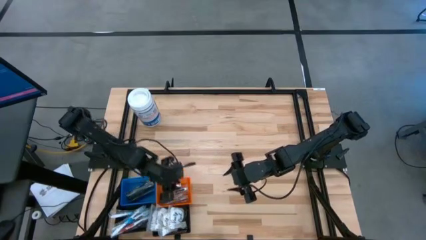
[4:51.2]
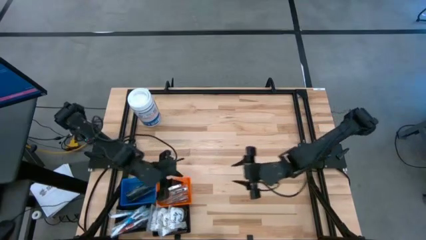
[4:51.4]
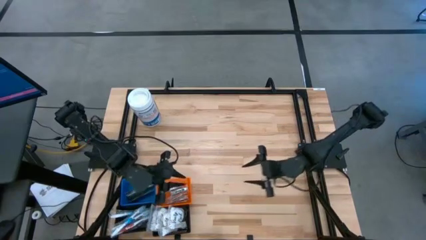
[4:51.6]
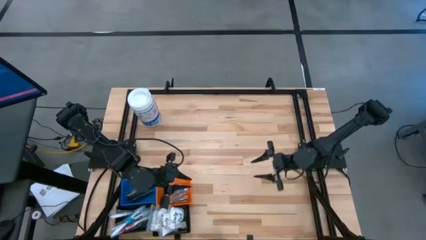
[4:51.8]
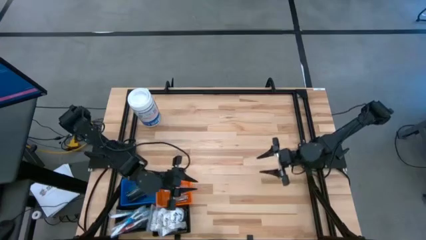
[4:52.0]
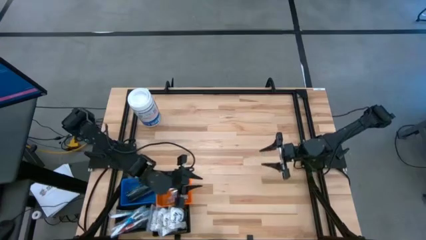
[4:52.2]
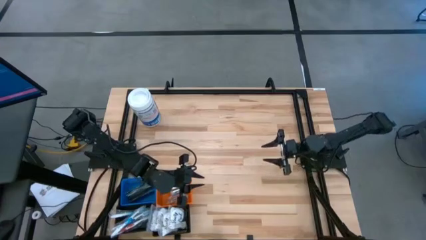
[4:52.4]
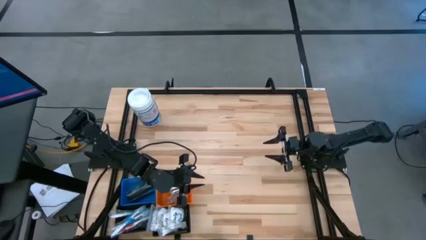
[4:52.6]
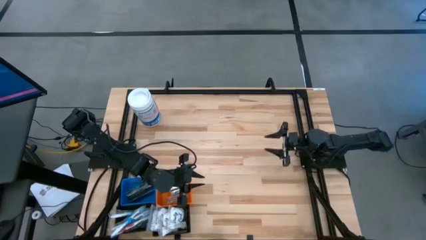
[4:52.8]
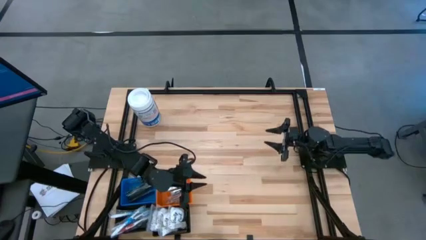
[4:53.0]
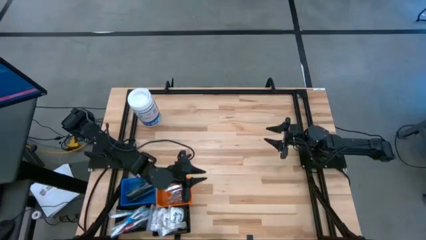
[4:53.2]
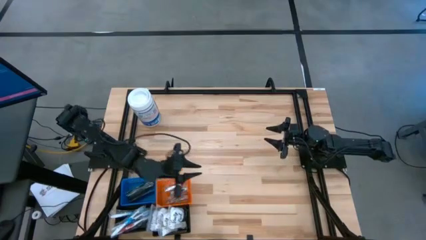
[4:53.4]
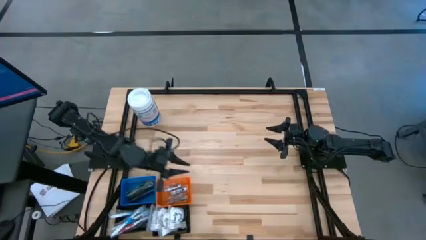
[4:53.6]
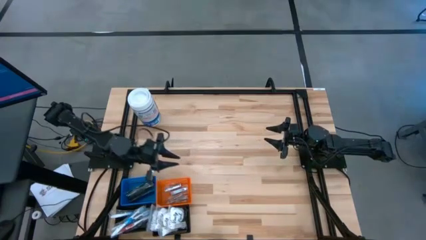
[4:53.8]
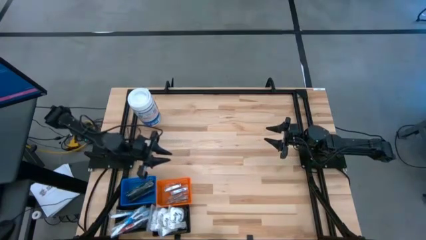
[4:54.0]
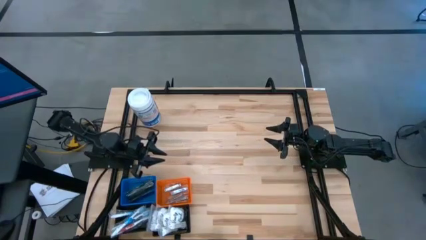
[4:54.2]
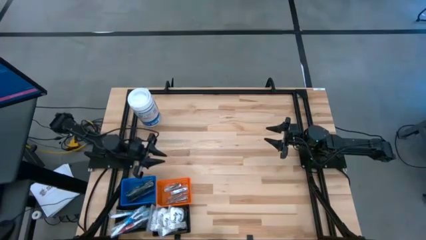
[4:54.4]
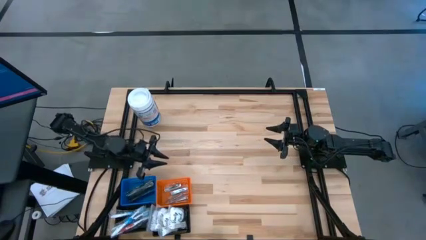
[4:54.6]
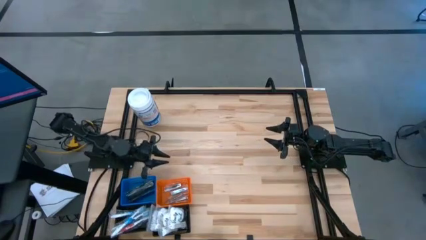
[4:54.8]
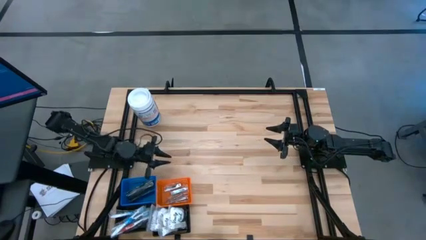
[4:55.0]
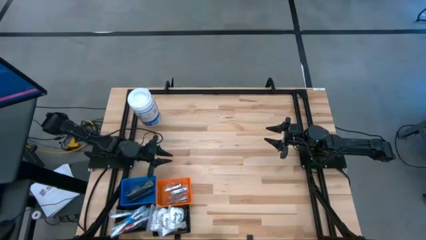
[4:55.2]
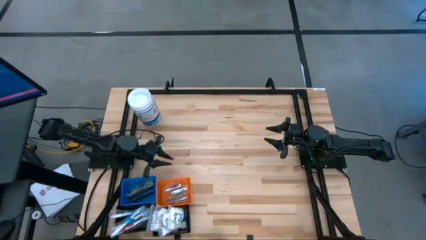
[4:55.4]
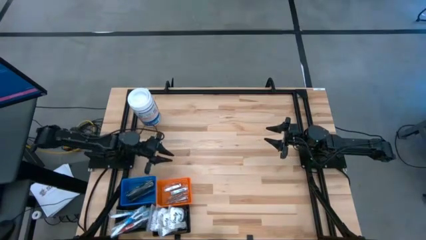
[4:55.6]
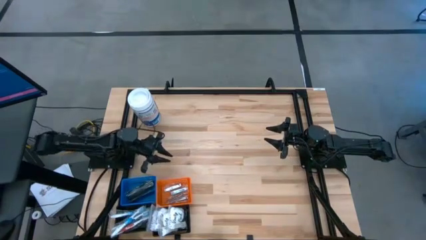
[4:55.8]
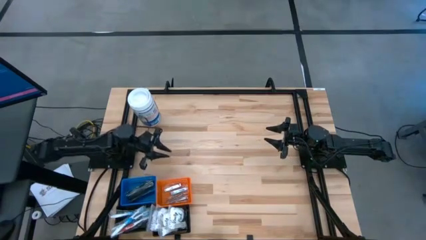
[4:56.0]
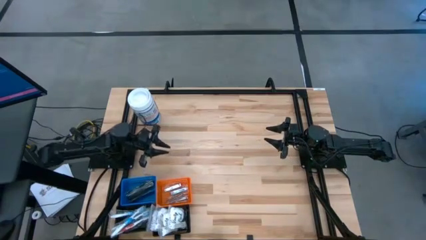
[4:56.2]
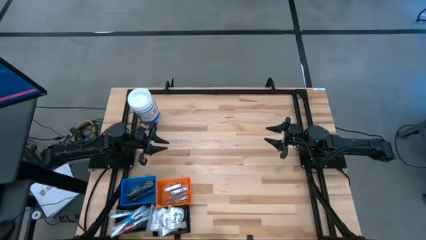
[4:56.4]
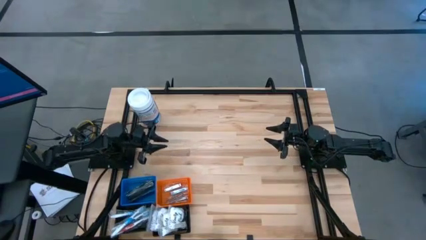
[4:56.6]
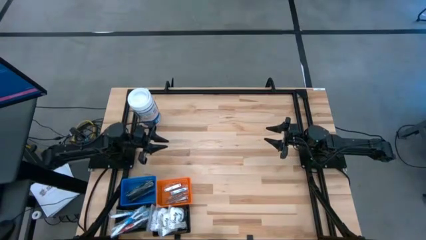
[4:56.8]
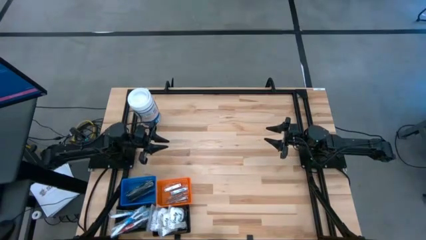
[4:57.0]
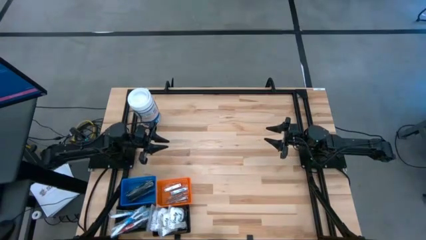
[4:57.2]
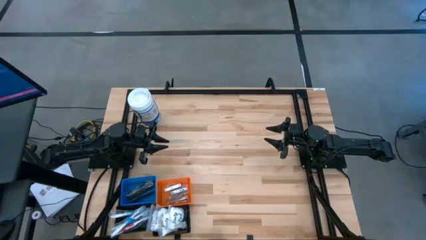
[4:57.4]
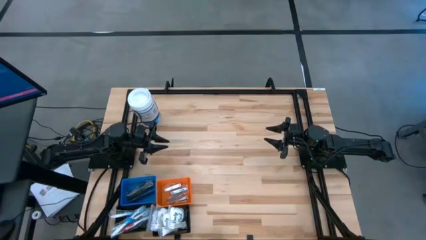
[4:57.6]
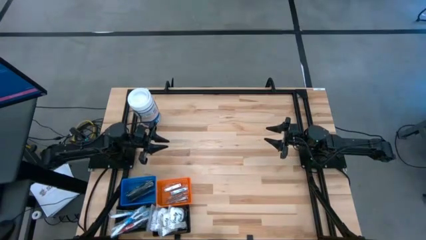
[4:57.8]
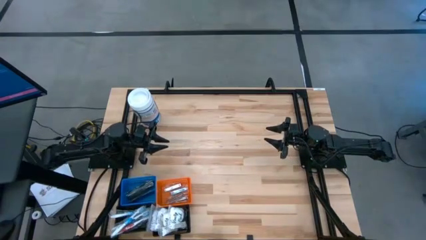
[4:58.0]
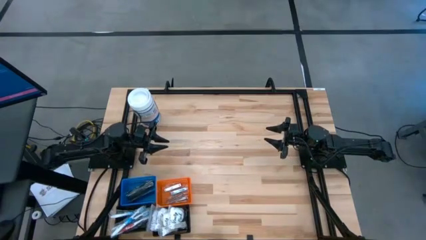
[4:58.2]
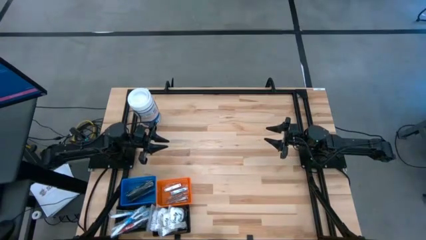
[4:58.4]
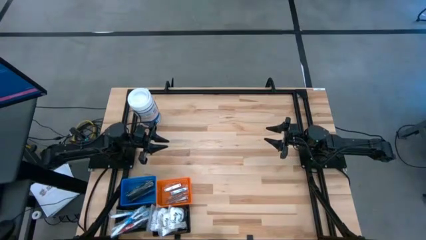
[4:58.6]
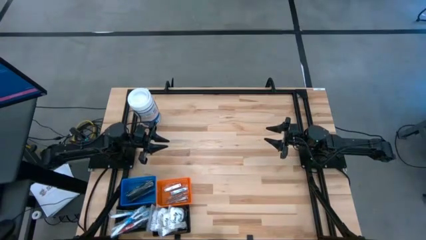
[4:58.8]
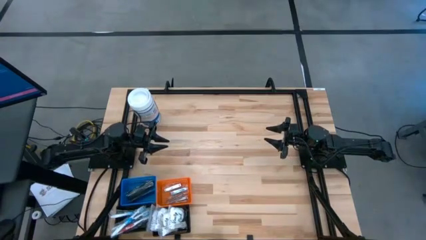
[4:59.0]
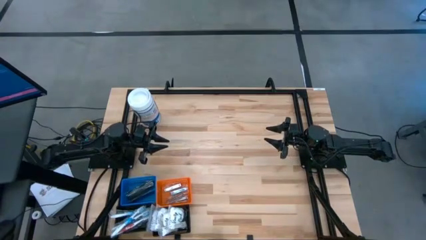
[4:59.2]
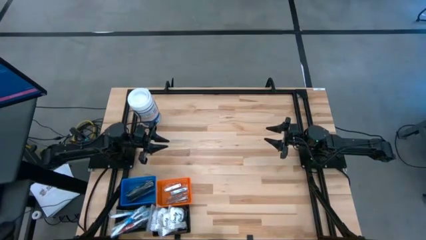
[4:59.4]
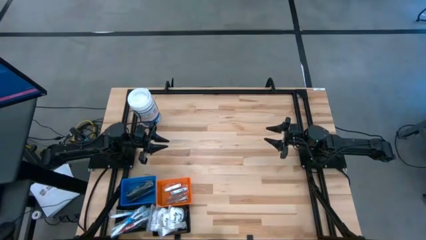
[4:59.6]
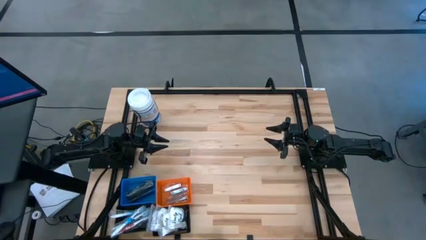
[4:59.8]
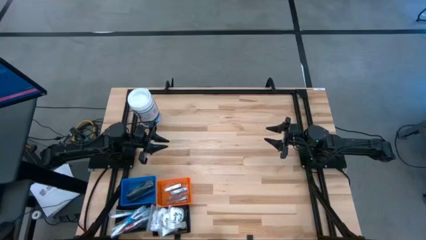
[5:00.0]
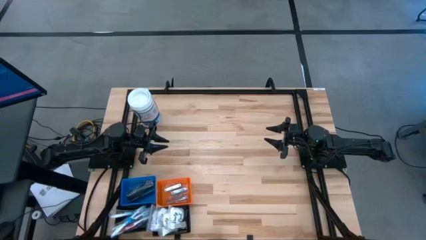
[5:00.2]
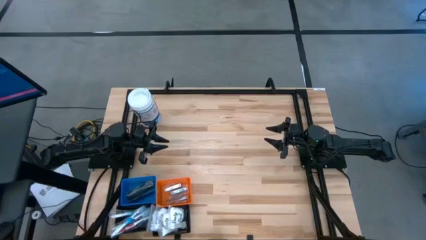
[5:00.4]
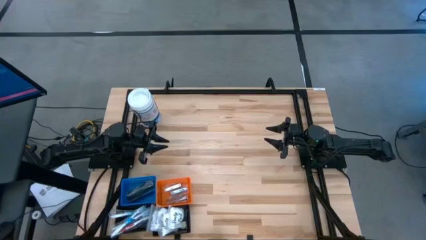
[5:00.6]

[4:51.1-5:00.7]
Task: Pick & Place Travel size toiletries
Return to Home Position

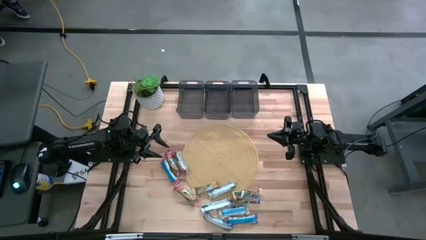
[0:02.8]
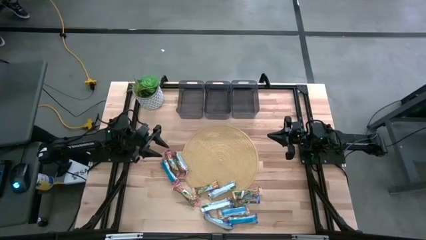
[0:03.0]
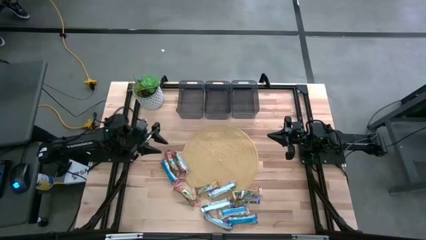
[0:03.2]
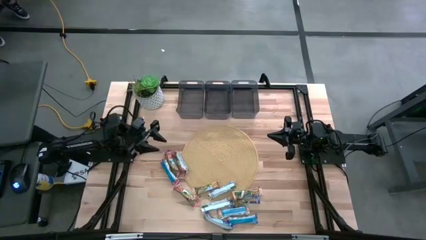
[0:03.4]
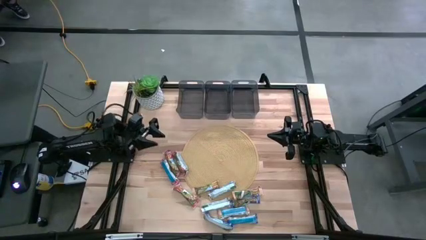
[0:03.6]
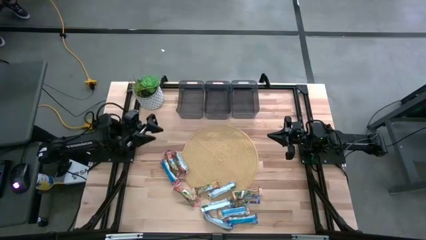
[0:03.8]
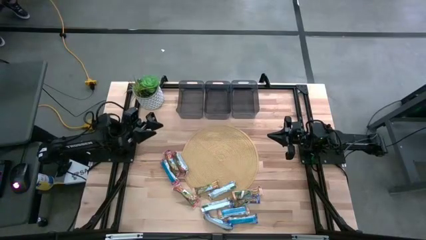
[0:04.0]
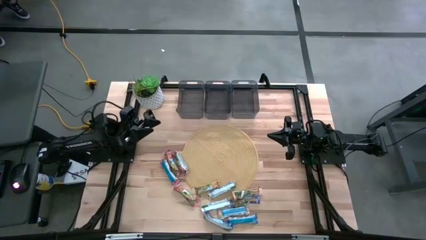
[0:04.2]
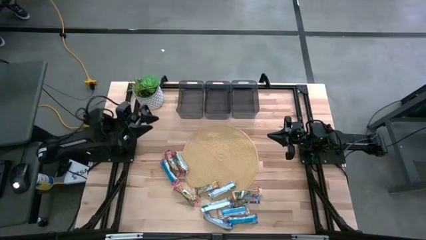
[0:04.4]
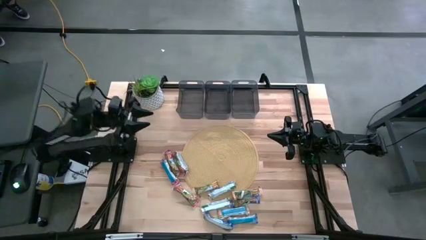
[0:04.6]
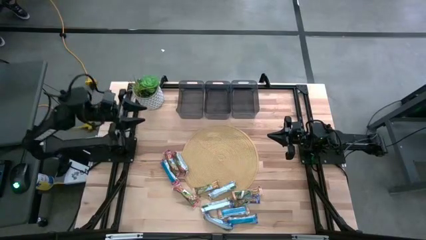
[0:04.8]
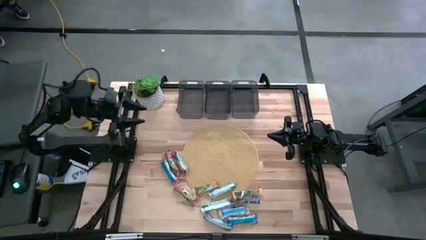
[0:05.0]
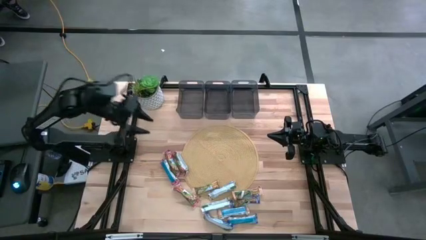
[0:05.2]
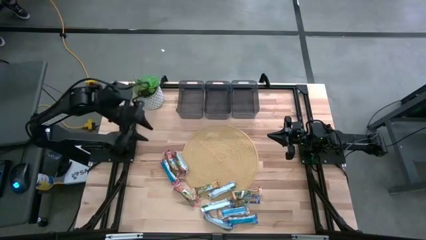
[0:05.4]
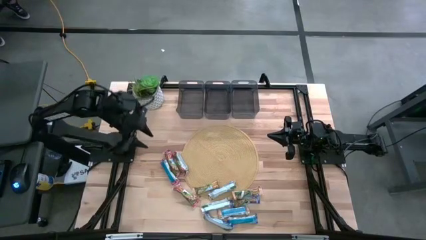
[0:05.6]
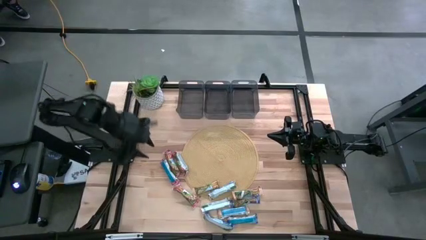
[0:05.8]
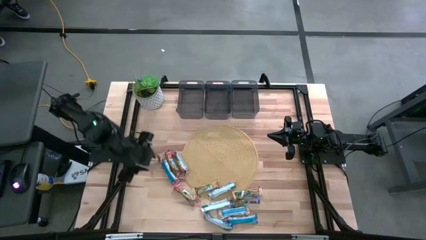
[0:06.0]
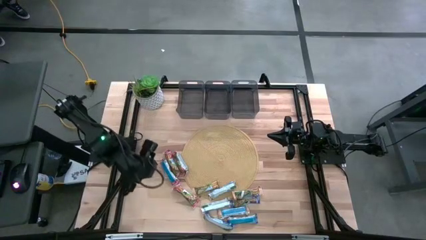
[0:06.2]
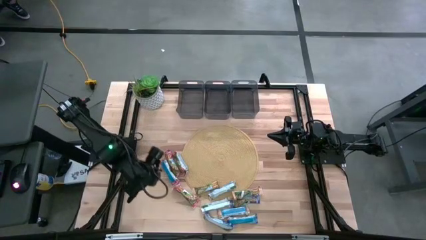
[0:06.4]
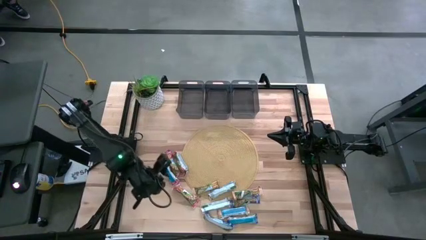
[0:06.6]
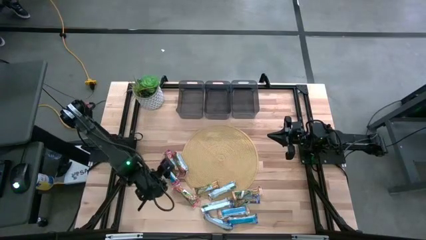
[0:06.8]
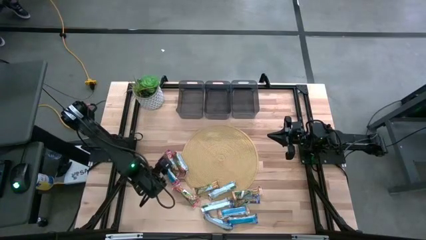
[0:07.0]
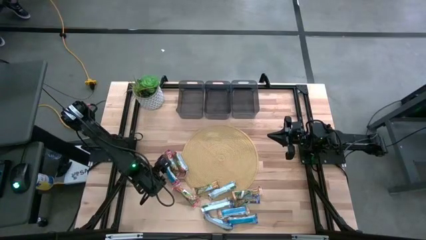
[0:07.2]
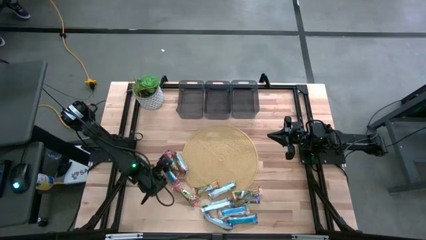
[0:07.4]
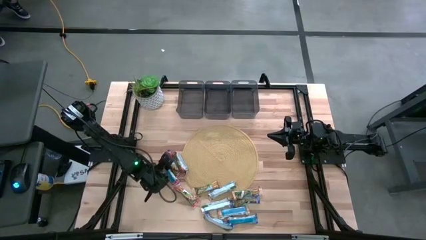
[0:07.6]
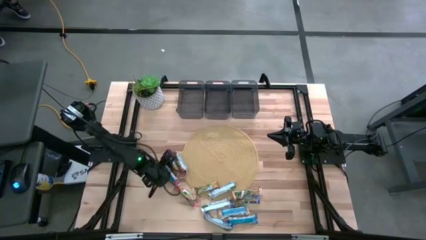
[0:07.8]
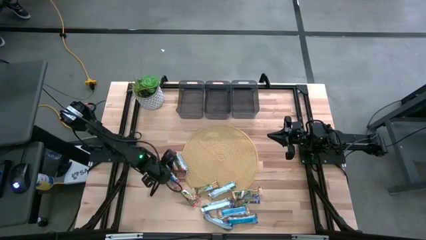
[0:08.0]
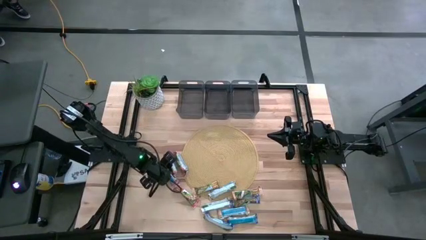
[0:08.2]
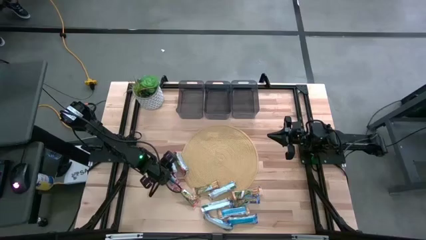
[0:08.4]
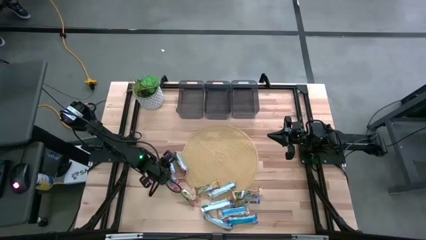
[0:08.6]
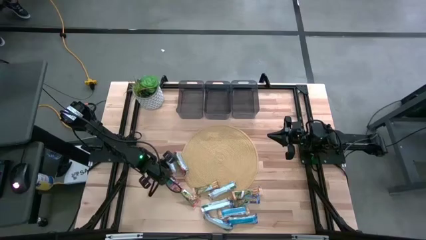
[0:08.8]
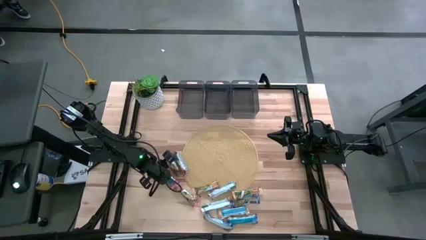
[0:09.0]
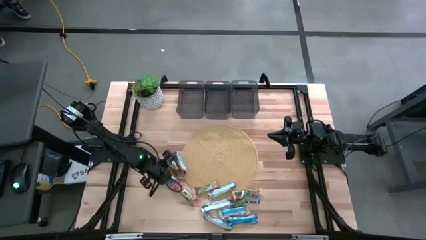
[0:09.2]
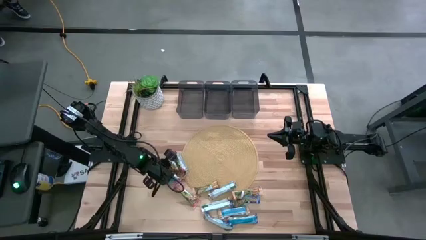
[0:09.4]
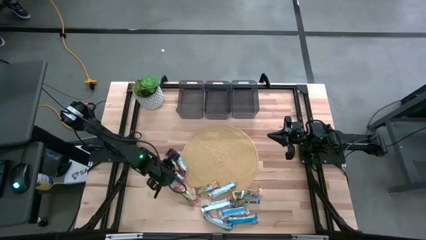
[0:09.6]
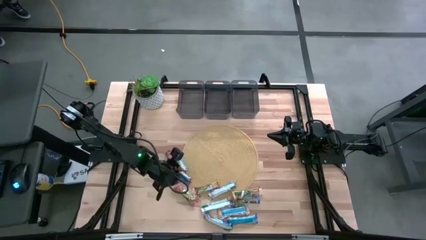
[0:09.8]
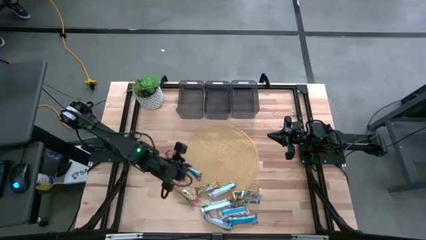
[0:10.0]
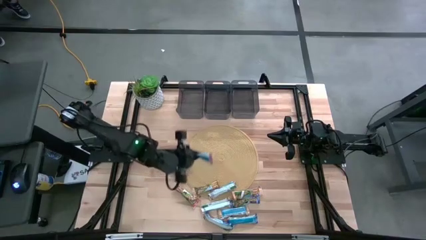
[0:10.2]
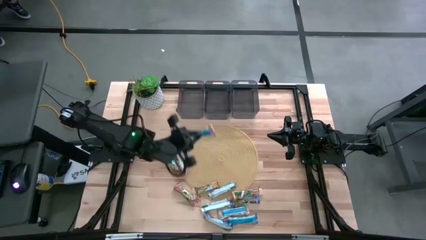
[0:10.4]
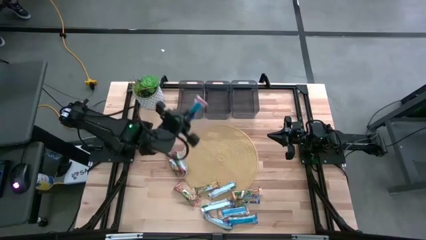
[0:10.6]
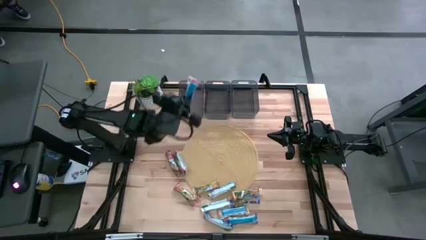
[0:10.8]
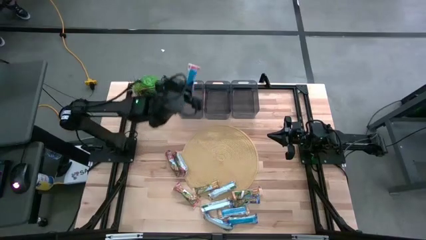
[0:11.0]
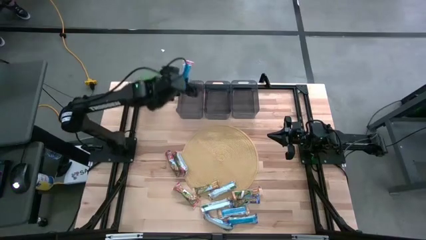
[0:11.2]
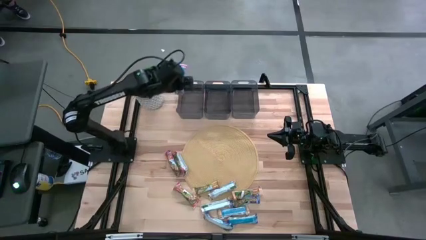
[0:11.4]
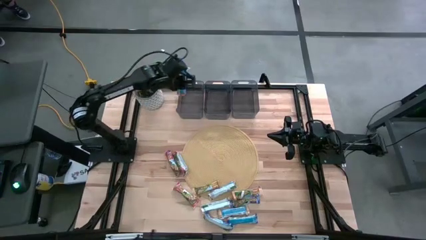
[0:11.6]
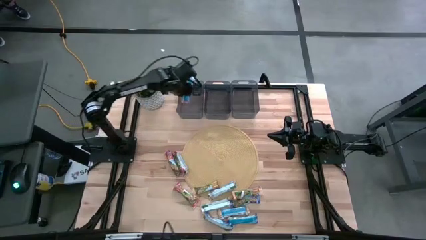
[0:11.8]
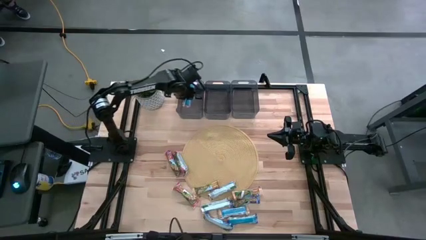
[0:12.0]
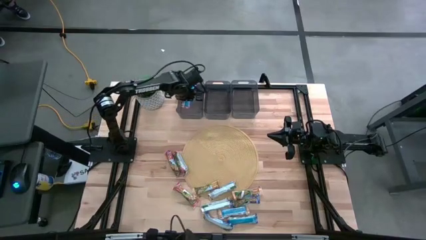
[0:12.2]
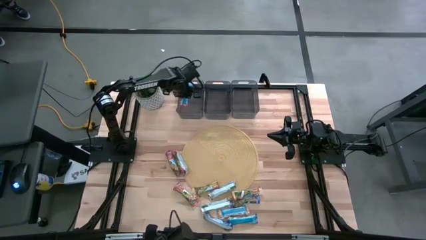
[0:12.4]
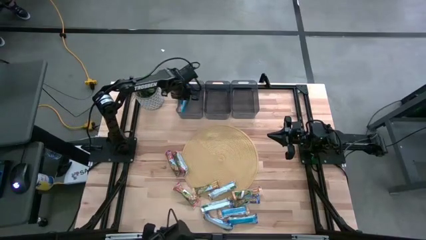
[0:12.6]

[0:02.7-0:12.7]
Task: Pick and place Granola Bars by type
Put the red granola bar into the left black bin
